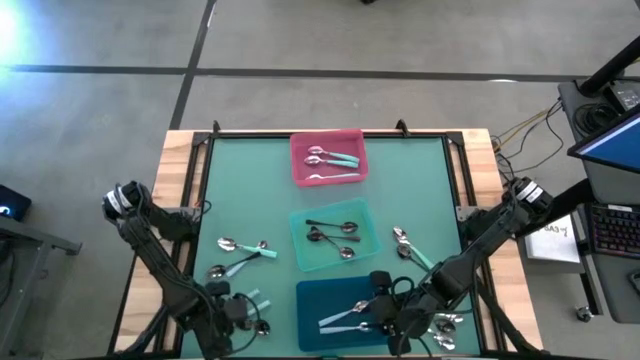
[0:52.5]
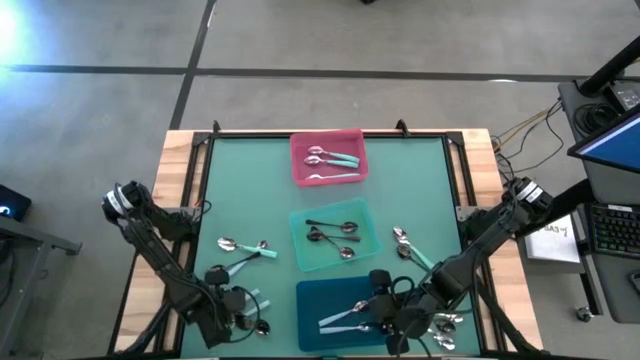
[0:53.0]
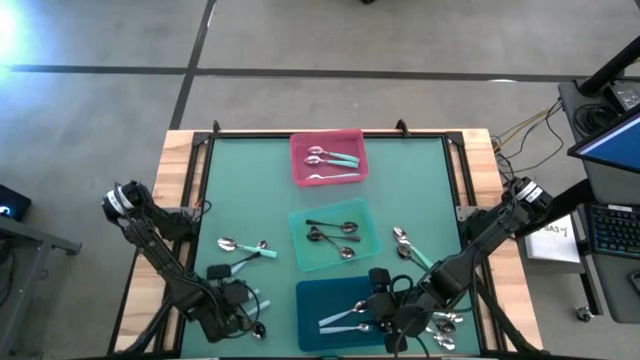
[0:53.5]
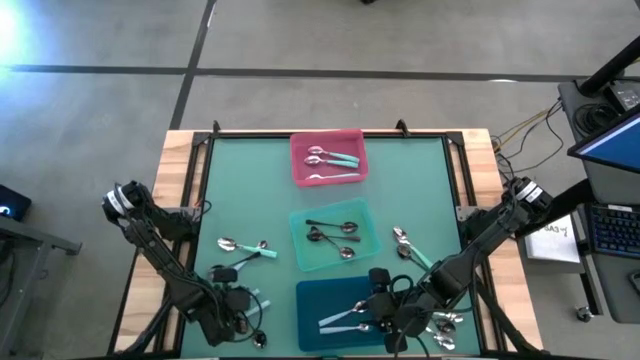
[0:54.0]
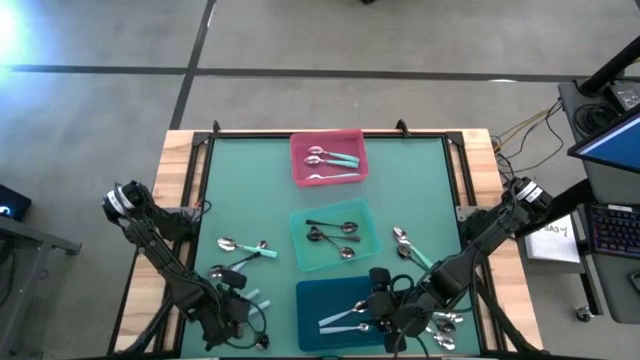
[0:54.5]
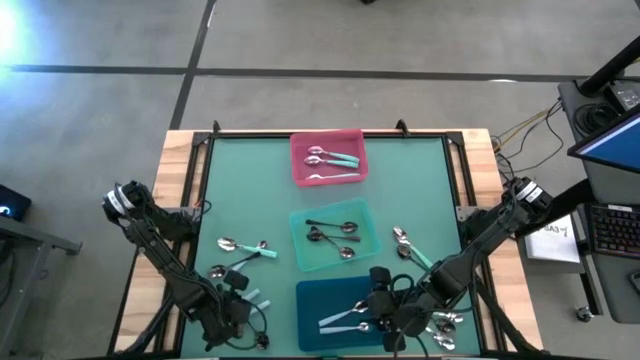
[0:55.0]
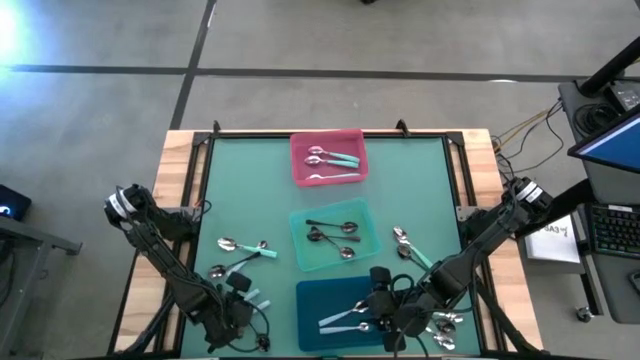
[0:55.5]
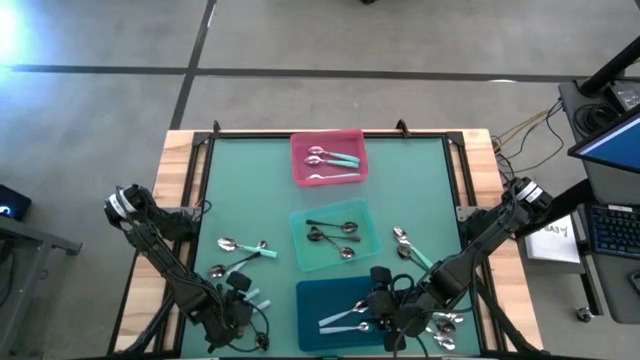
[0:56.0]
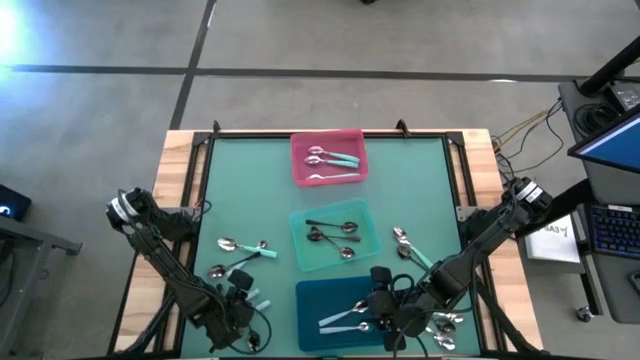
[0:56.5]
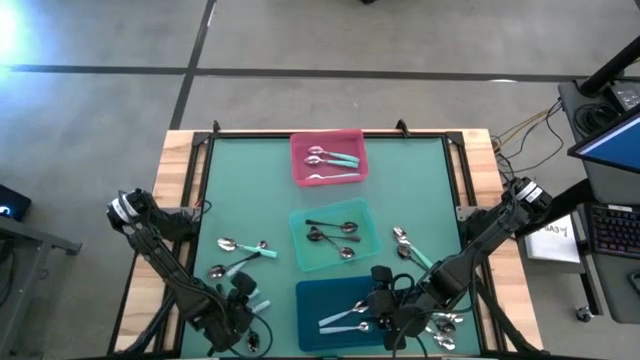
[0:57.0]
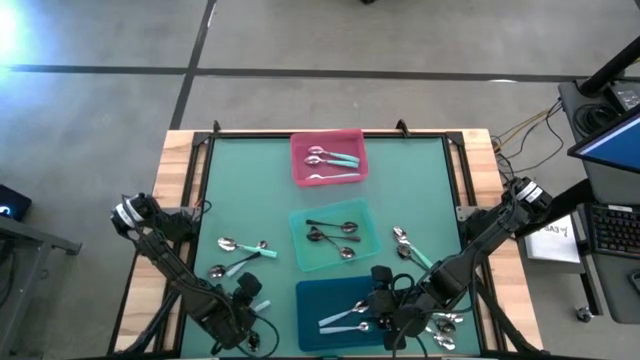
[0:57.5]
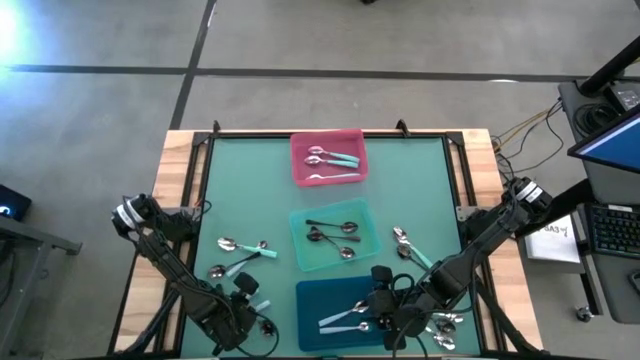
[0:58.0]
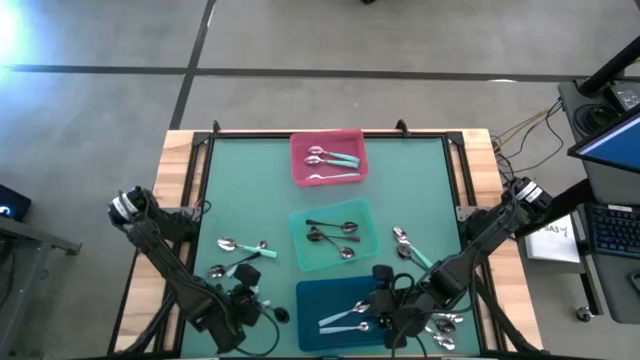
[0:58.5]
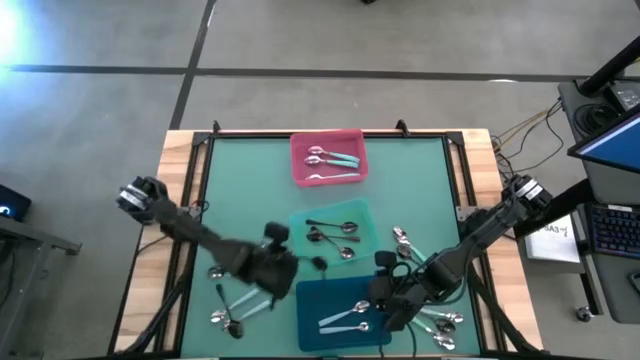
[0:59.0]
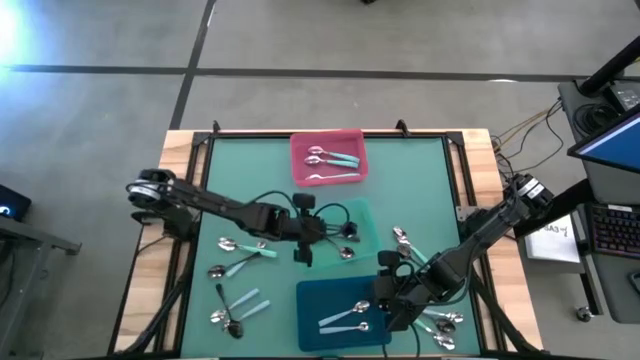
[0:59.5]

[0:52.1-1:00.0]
Task: Sort silverware by color (type)
Put the black spoon into the green bin

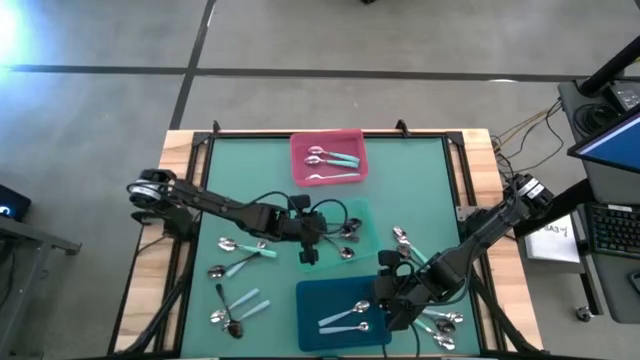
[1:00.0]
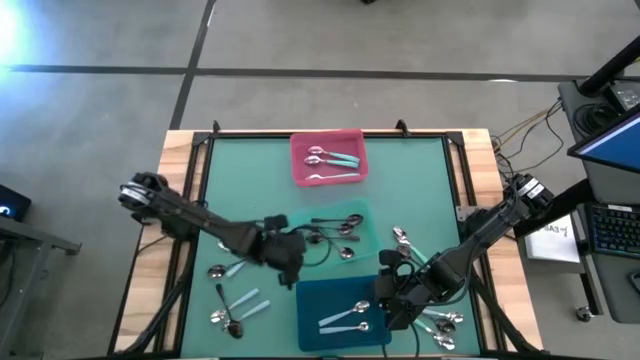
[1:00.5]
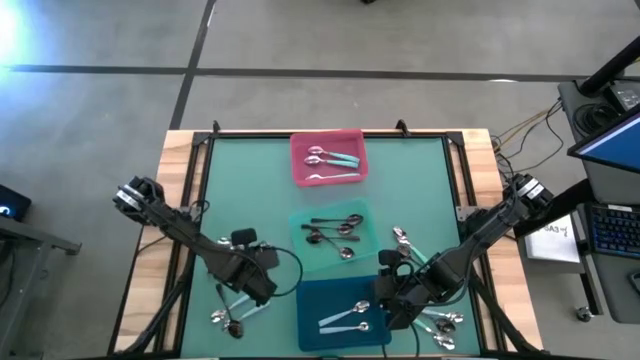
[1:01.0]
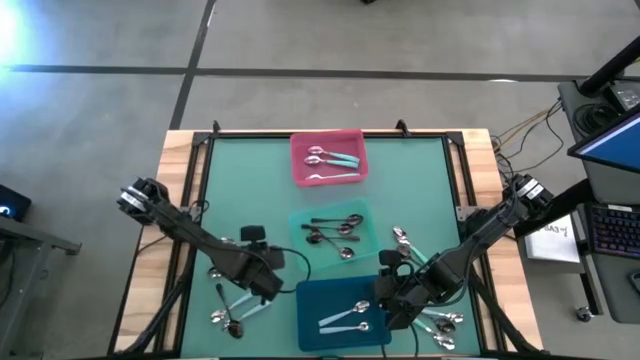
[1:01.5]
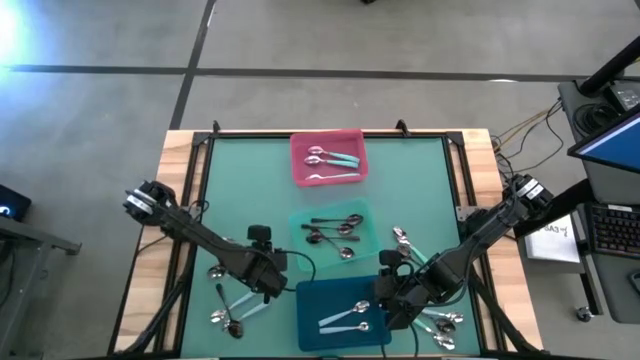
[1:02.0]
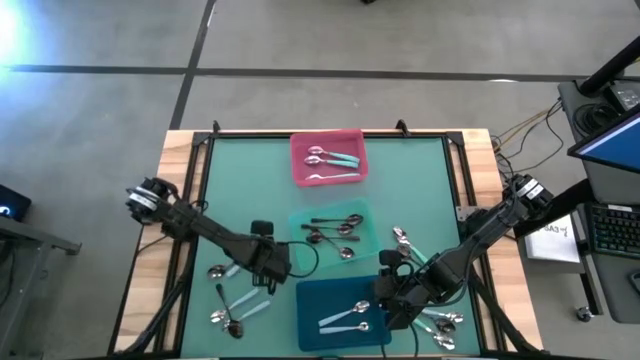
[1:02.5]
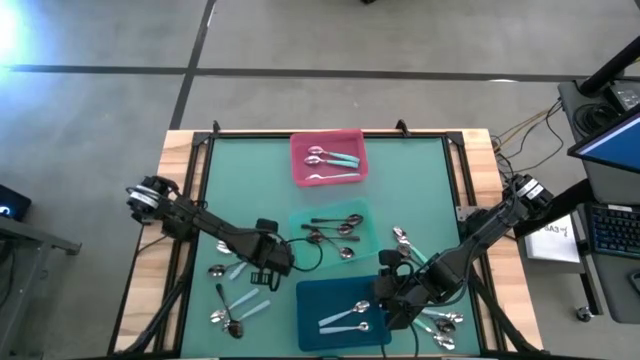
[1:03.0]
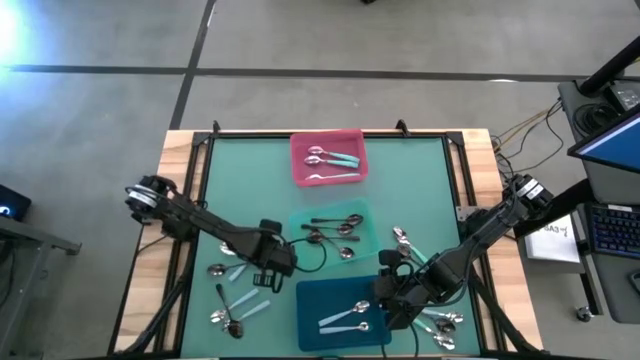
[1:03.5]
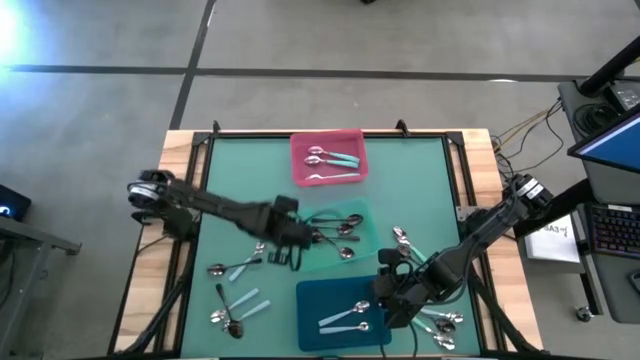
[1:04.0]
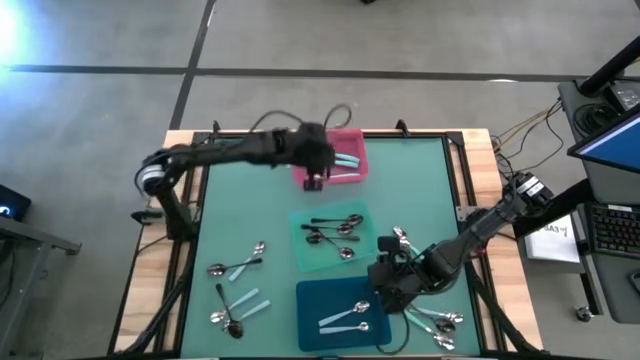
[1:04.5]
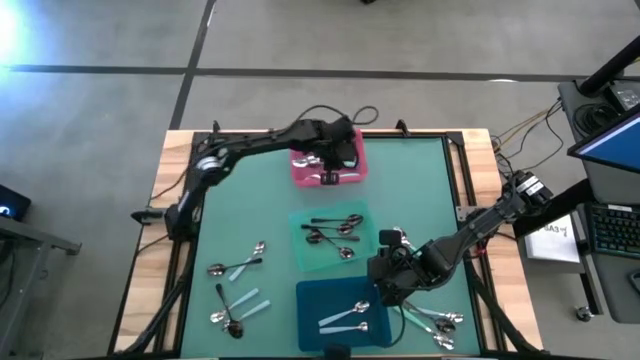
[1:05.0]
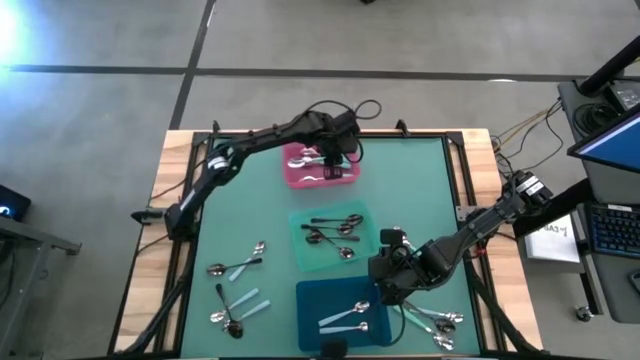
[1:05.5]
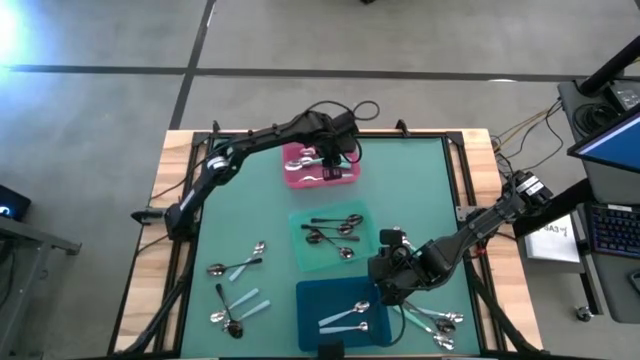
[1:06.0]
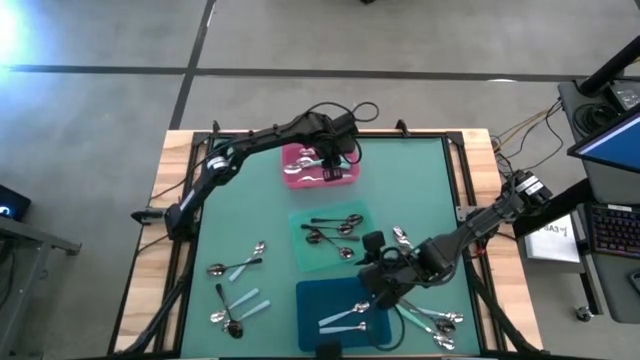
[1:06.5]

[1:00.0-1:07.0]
Put the green spoon into the pink bin

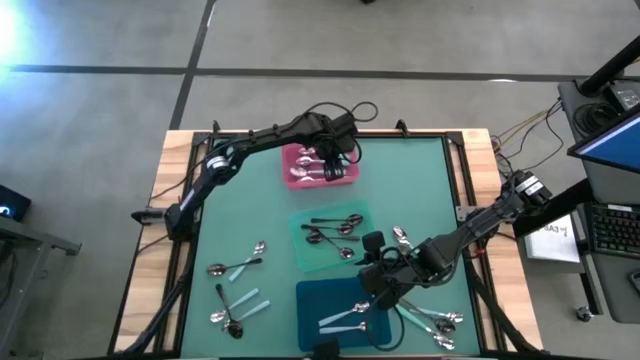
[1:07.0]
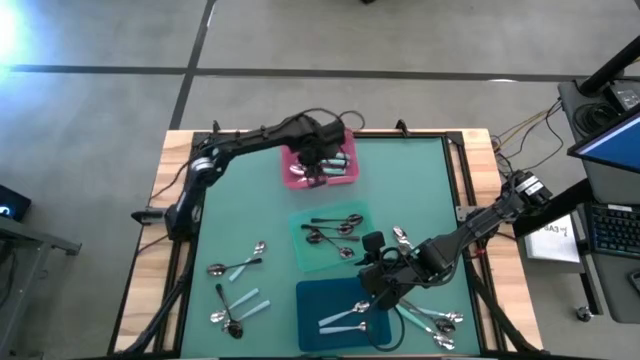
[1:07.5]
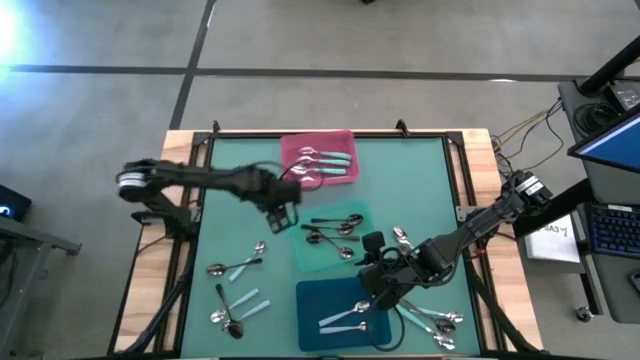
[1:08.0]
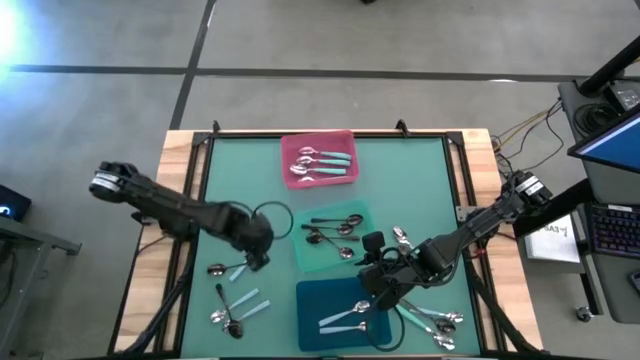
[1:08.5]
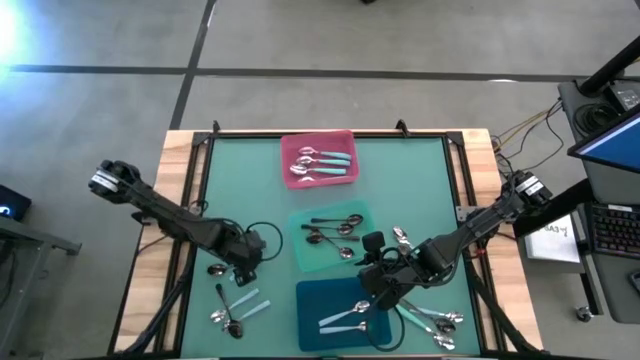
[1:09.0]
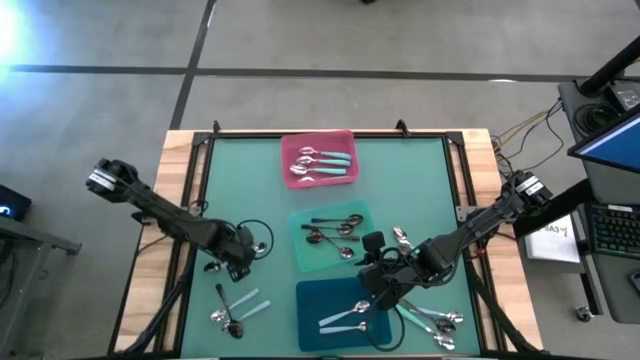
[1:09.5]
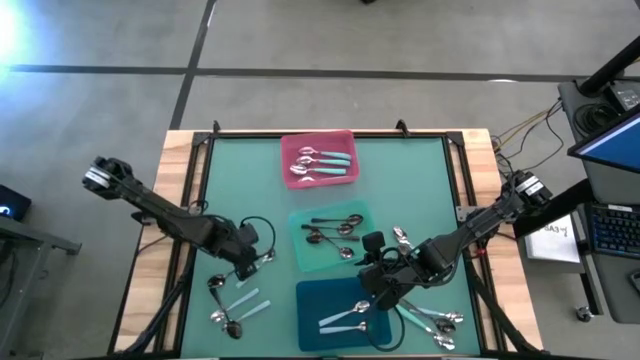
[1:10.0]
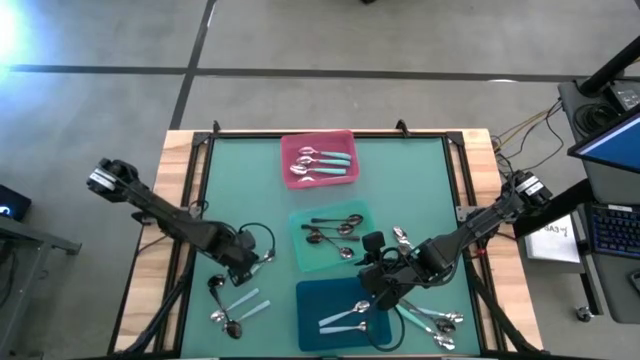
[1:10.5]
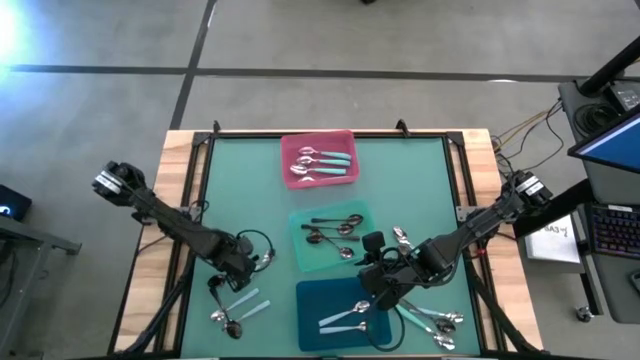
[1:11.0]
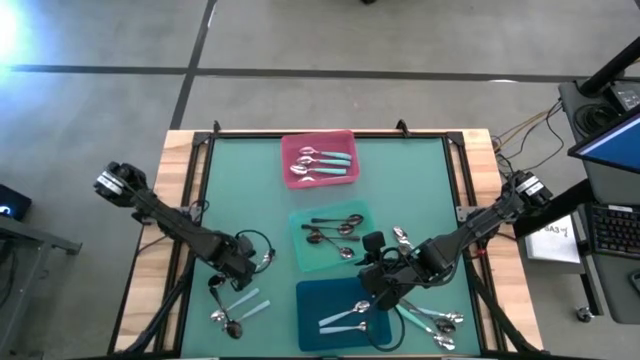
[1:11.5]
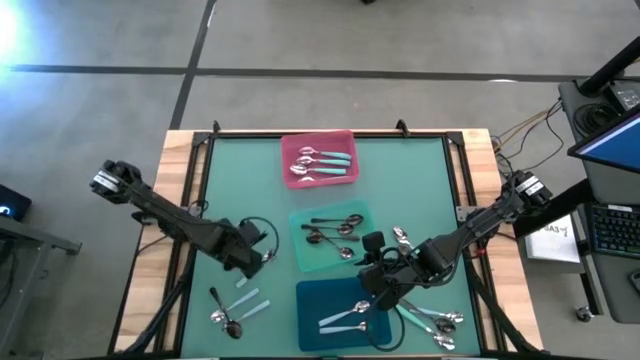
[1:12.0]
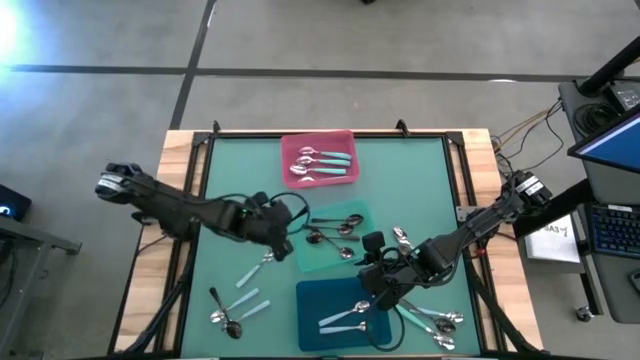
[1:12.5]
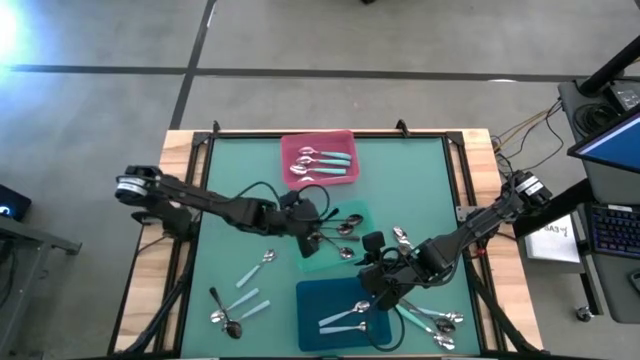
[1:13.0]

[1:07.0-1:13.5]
Put the black spoon into the green bin

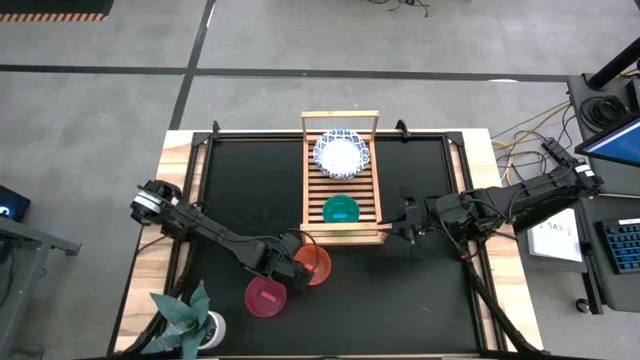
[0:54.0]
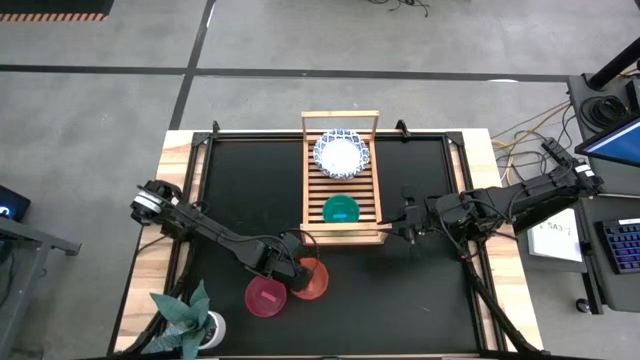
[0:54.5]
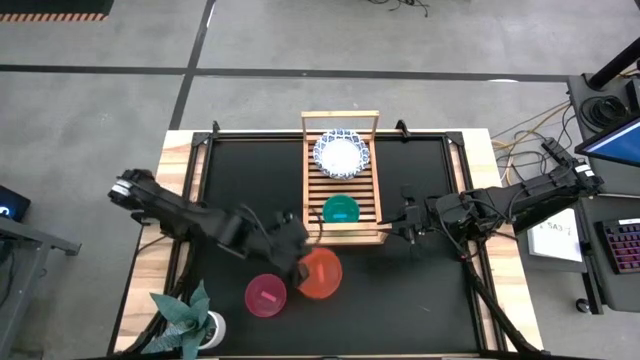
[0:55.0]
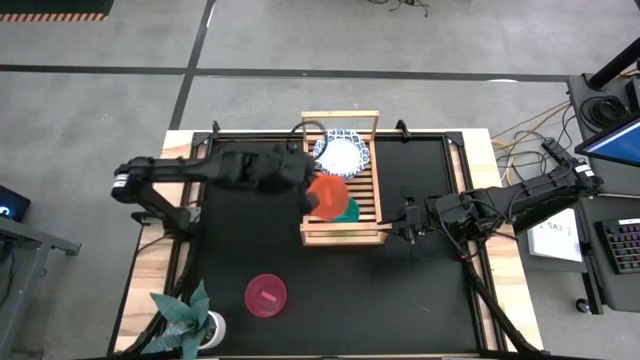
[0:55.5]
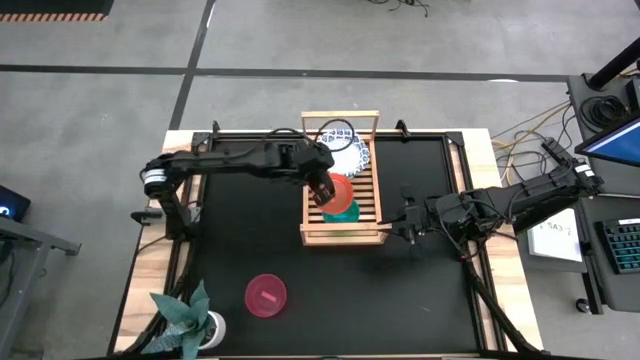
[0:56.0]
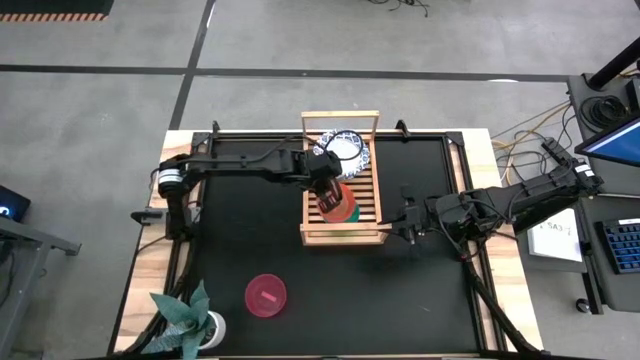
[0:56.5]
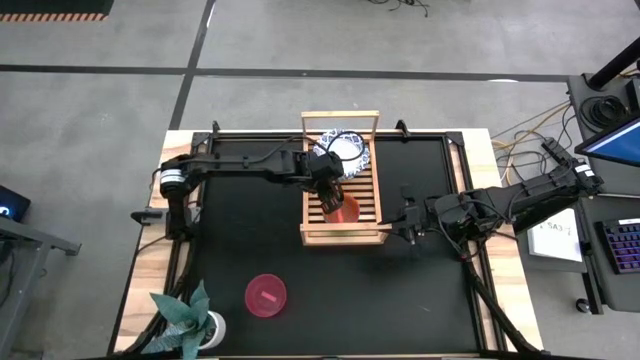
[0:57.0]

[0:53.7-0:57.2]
Task: Place and stack bowls onto a shelf
Stack the orange bowl on top of the blue bowl on the shelf
